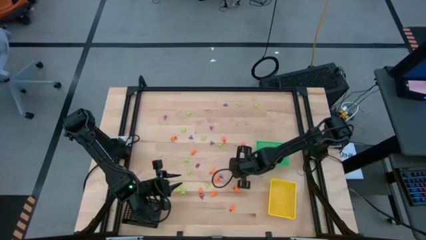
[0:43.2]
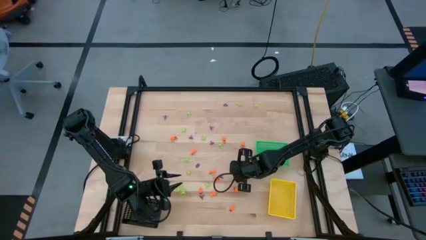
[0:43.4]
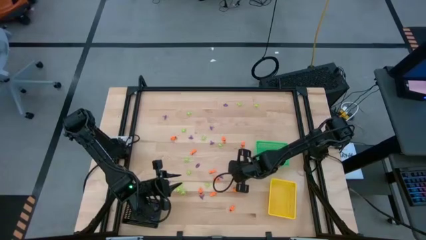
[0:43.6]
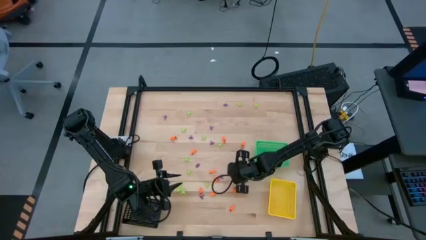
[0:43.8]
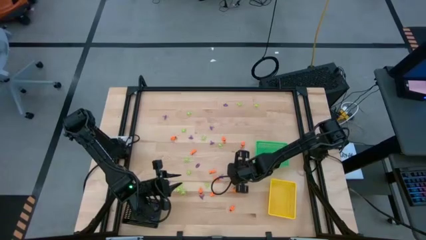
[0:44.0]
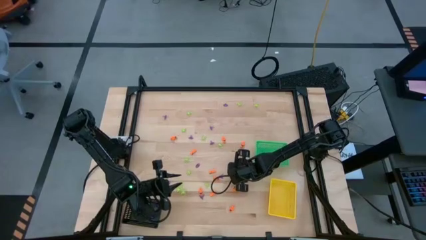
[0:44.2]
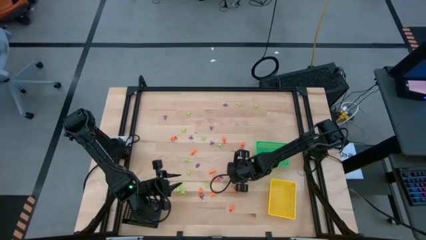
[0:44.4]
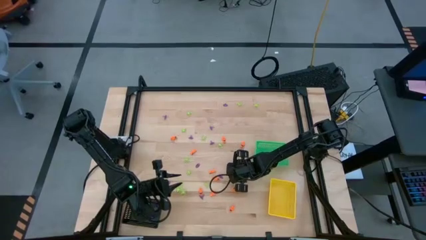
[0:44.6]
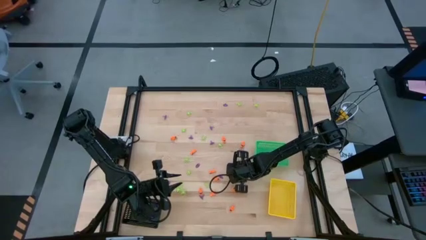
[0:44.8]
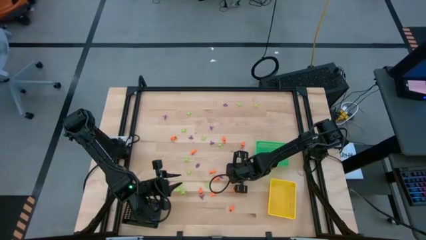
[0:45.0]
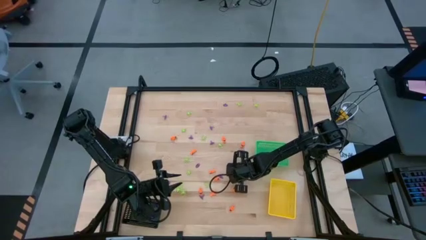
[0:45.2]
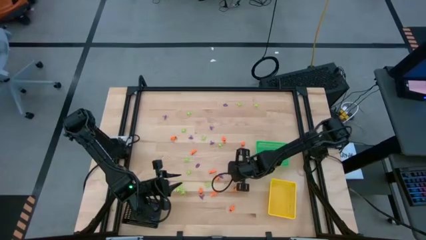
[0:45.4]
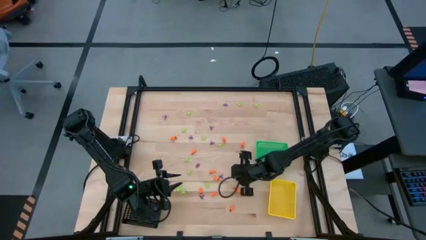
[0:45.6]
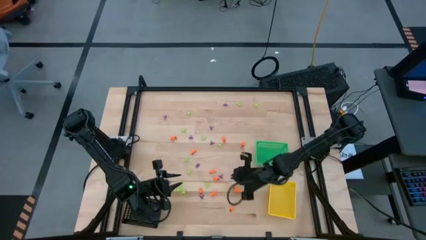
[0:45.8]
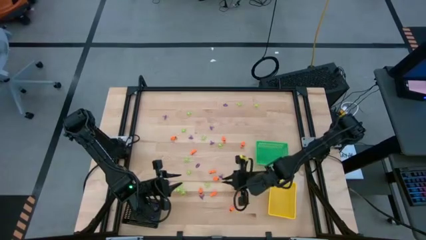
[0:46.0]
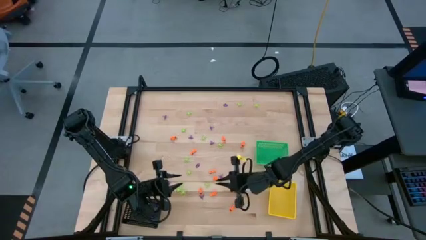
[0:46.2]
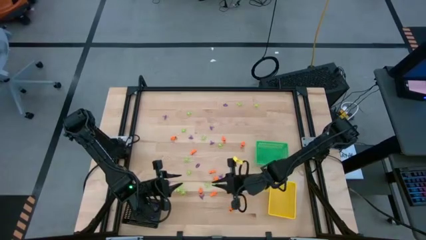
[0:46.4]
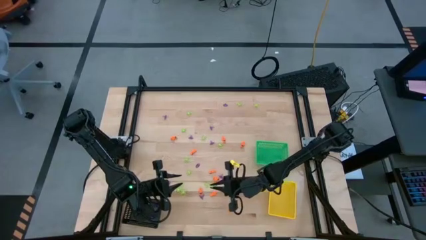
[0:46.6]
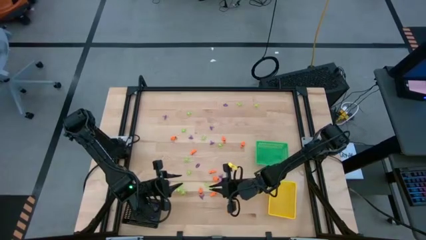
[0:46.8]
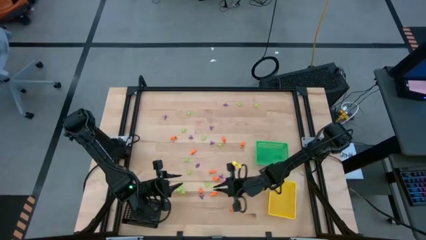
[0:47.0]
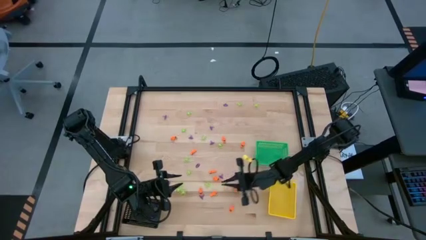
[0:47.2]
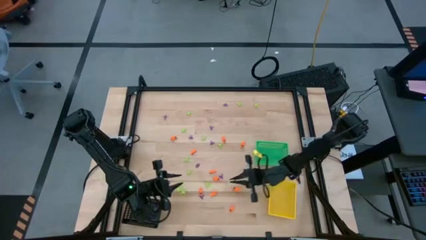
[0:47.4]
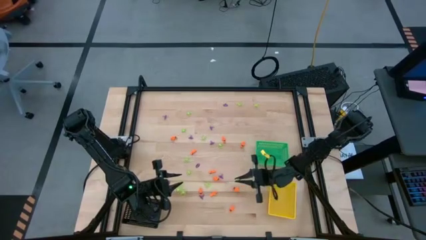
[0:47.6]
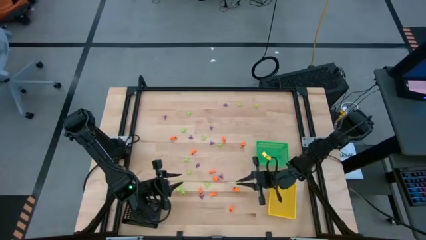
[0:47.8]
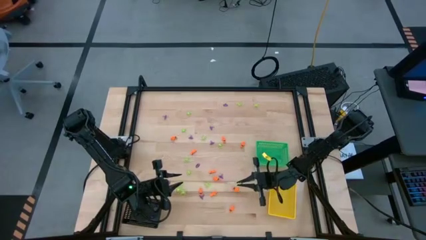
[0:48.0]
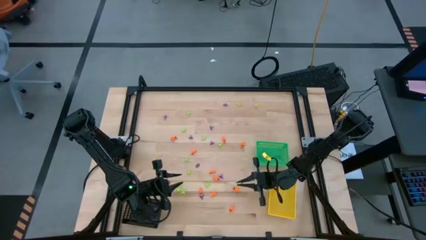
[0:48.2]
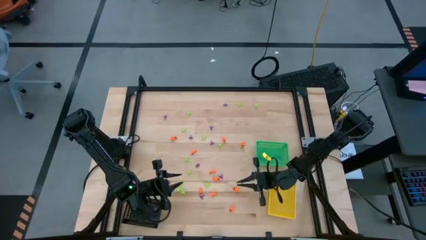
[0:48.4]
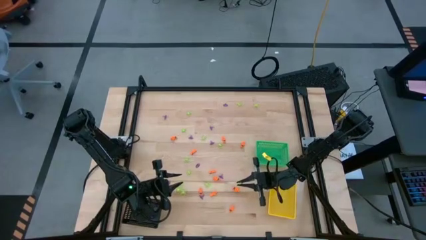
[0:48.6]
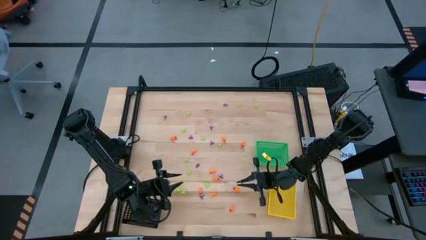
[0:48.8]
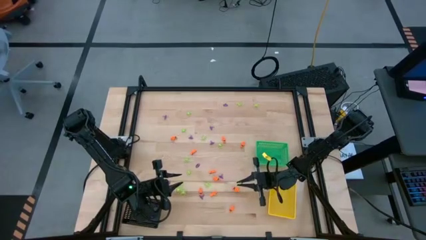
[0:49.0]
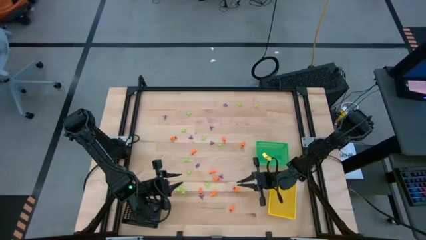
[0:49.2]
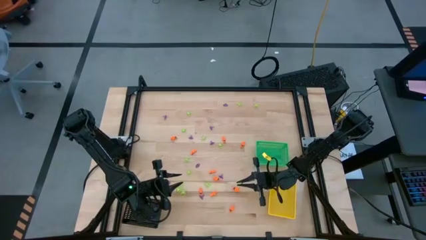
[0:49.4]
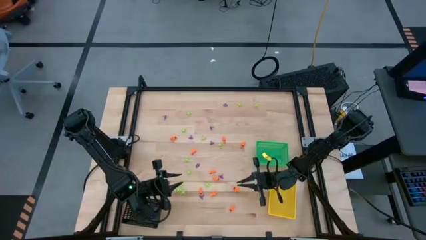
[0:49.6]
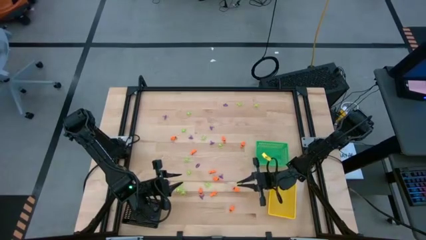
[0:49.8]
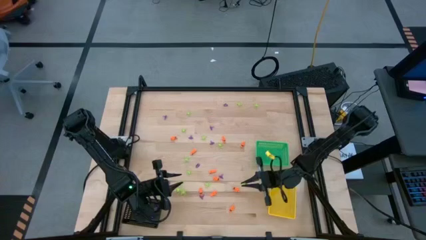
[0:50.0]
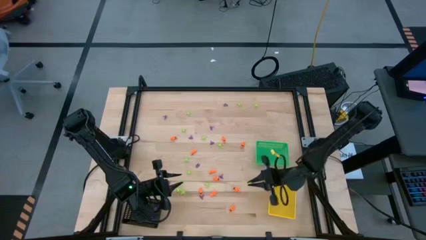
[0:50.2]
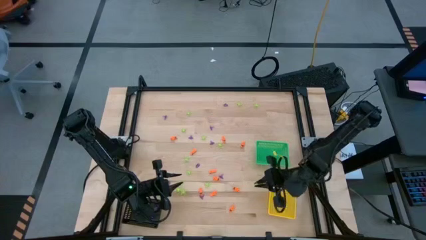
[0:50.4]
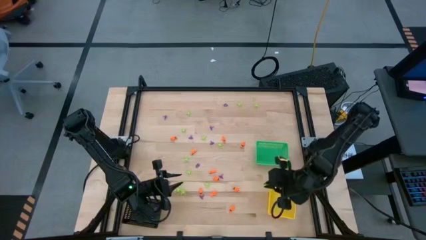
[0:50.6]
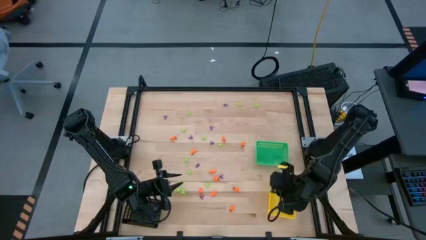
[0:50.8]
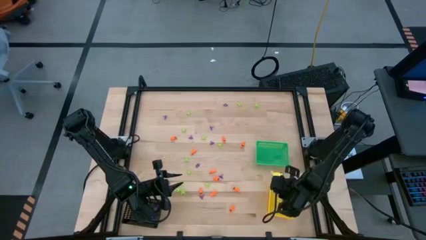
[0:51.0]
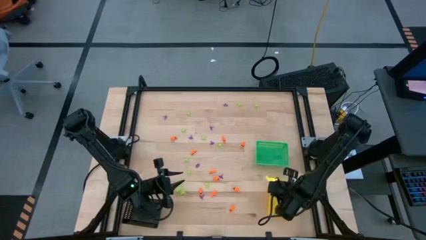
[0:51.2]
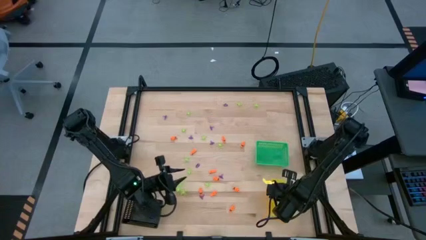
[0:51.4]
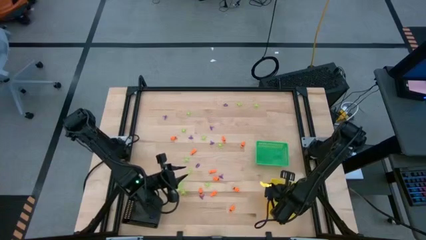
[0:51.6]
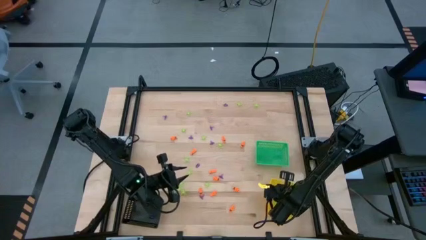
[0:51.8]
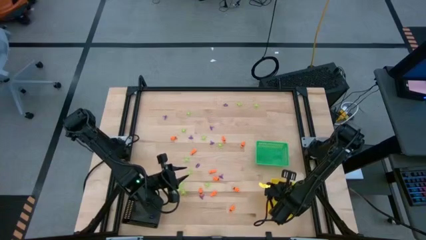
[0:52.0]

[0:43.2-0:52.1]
Task: Sort Halloween decoration
Put the green spider toy into the yellow bin

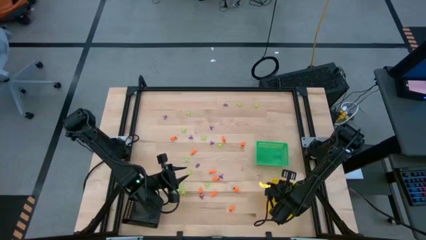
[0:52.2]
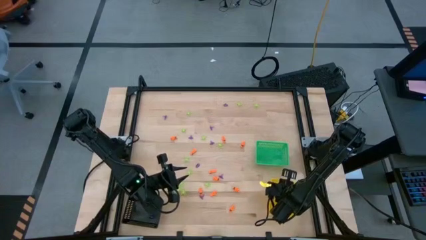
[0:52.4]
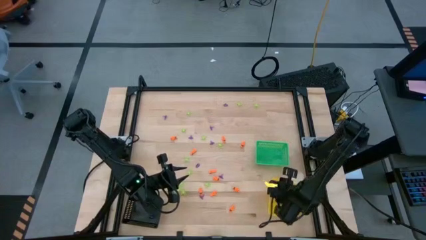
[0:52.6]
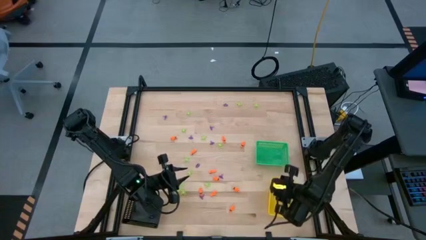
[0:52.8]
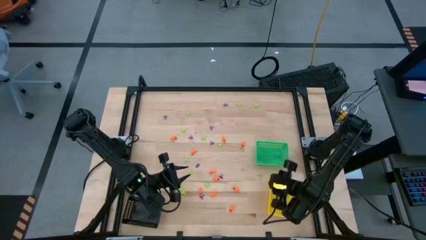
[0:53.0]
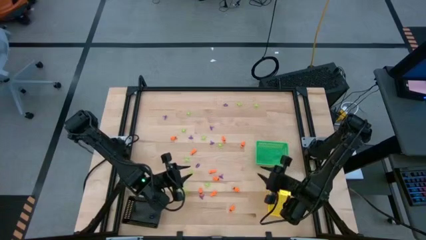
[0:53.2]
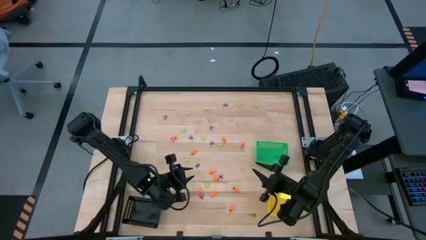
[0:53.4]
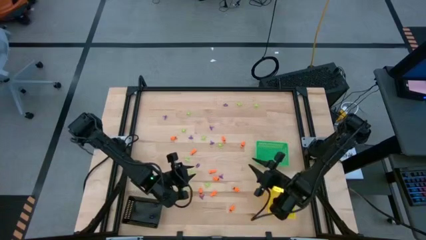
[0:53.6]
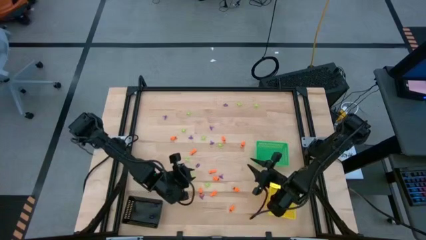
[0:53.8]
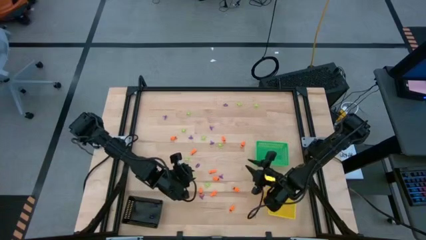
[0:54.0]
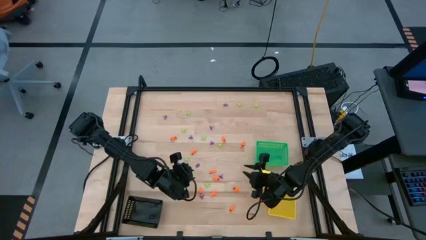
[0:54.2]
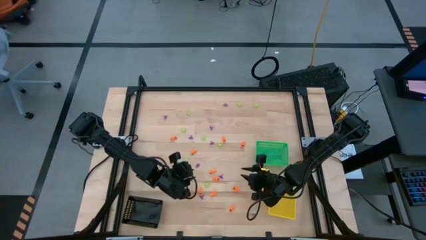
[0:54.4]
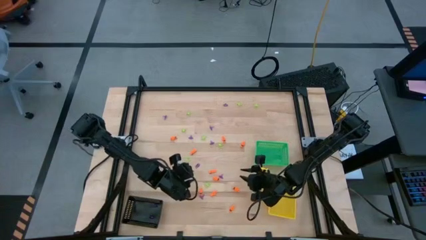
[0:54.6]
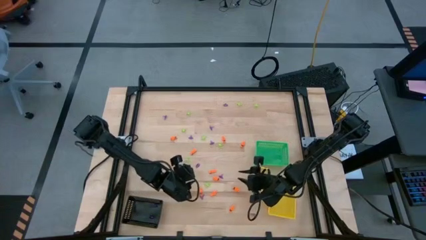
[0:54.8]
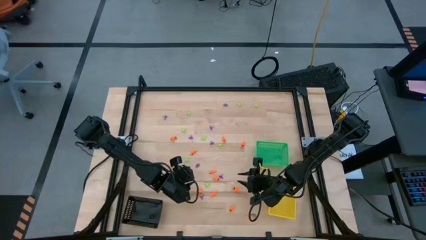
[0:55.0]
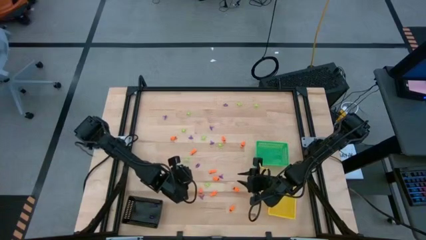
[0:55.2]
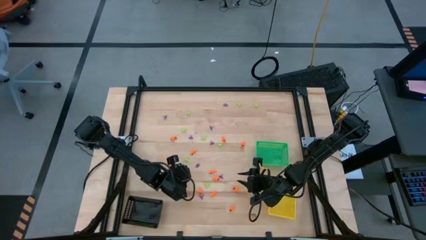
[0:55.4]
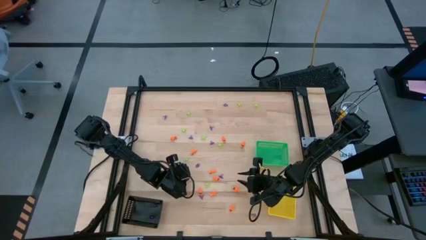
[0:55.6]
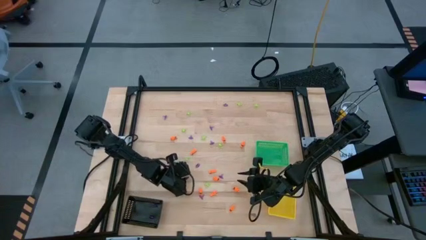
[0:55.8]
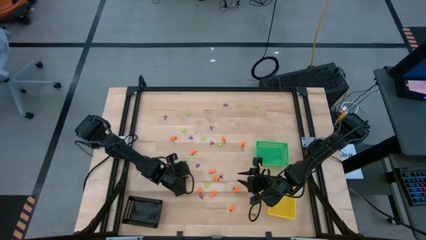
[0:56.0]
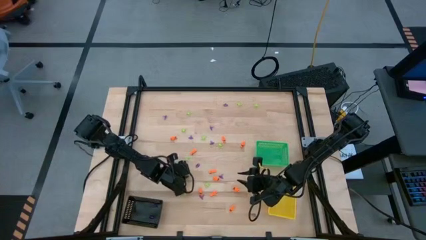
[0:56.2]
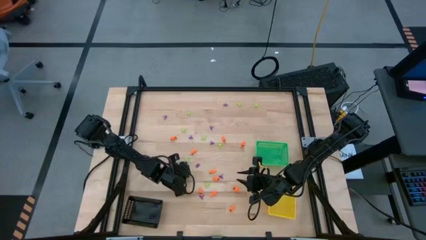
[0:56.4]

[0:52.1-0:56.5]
Put the green spider toy into the yellow bin
